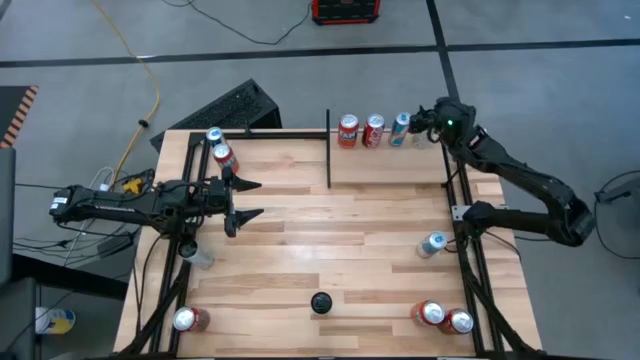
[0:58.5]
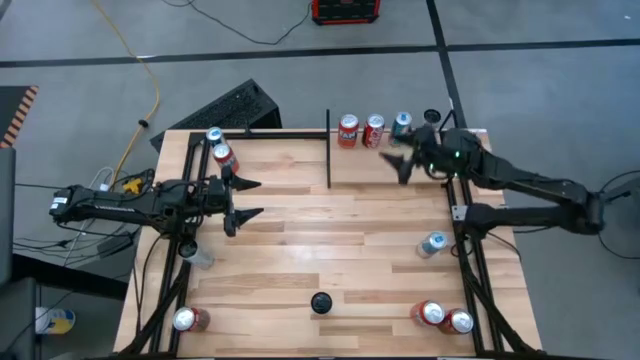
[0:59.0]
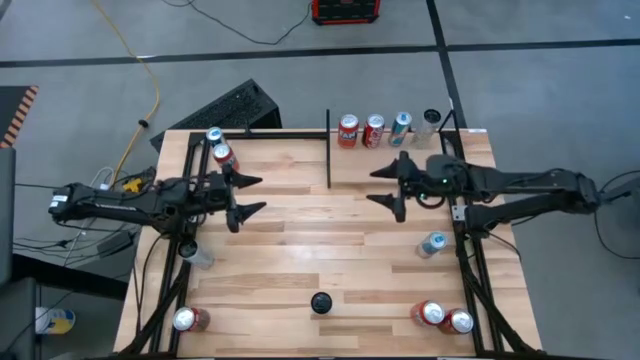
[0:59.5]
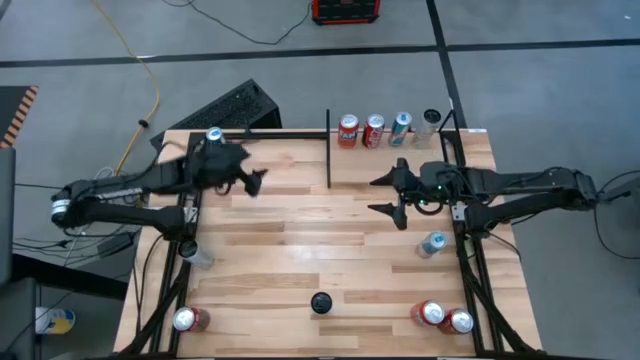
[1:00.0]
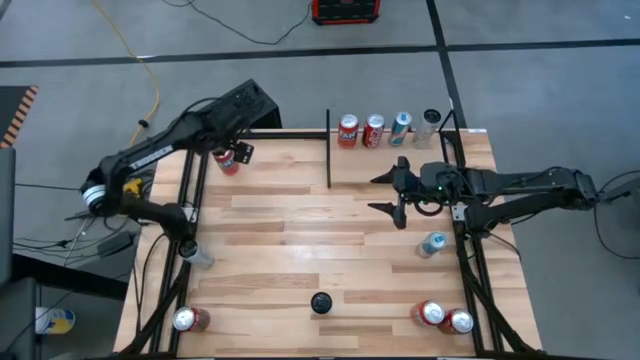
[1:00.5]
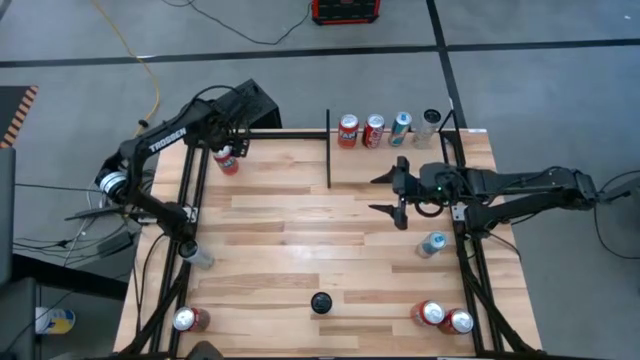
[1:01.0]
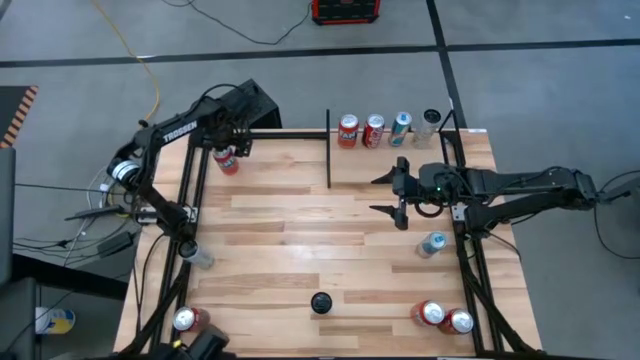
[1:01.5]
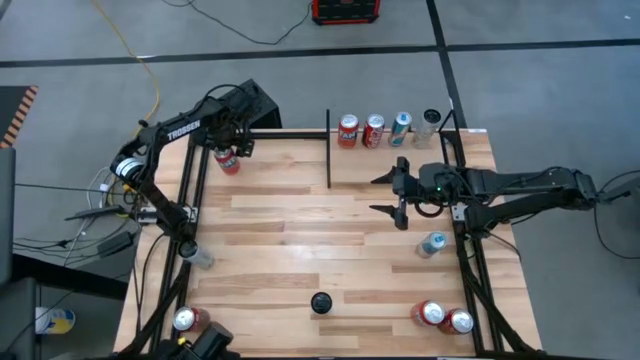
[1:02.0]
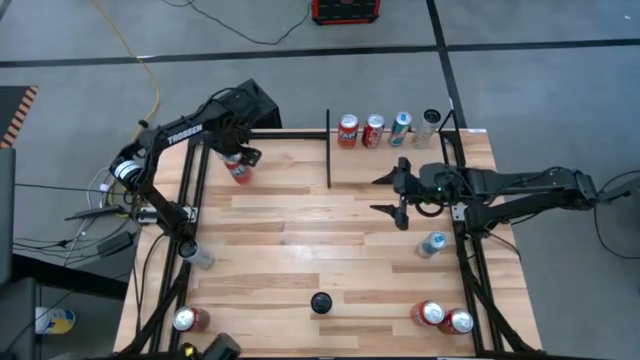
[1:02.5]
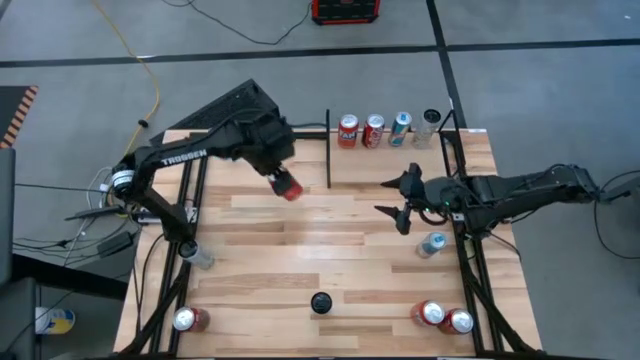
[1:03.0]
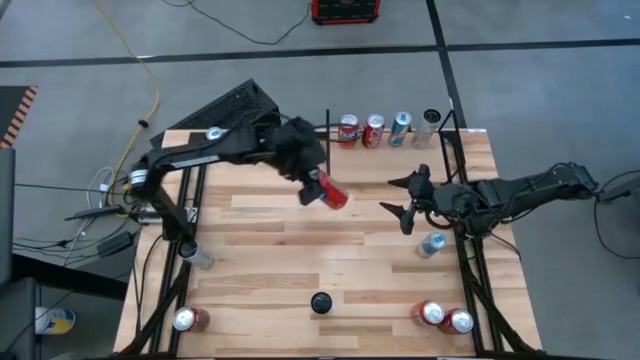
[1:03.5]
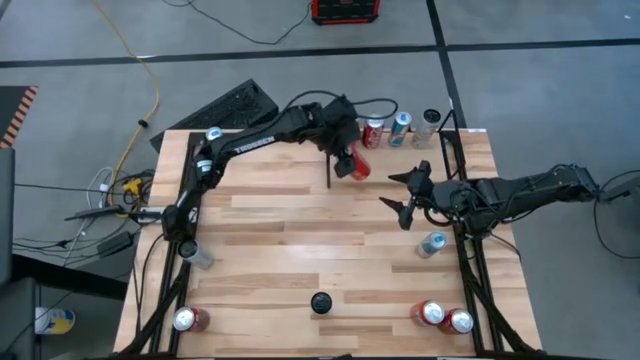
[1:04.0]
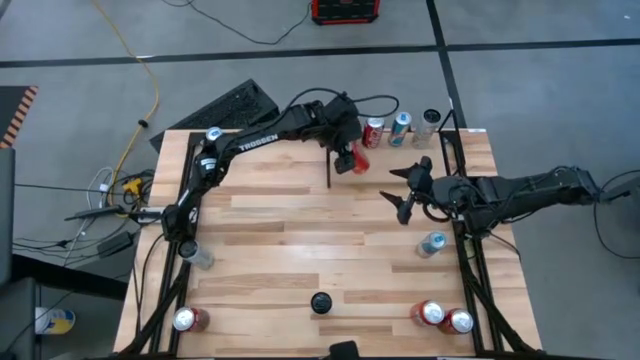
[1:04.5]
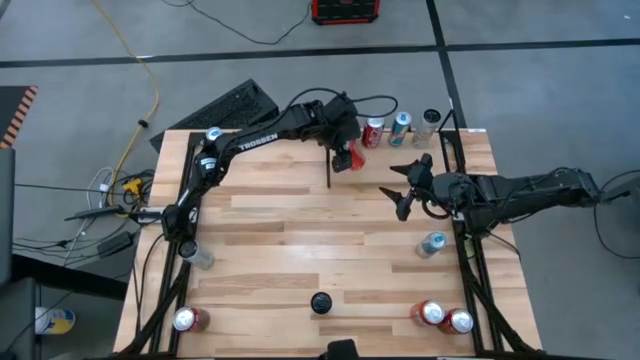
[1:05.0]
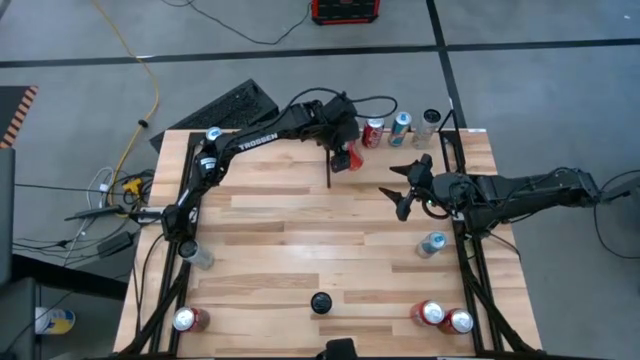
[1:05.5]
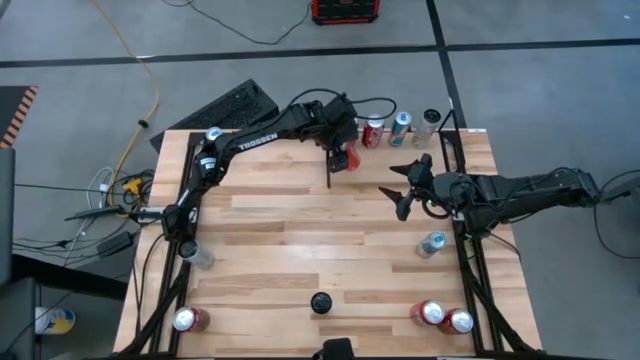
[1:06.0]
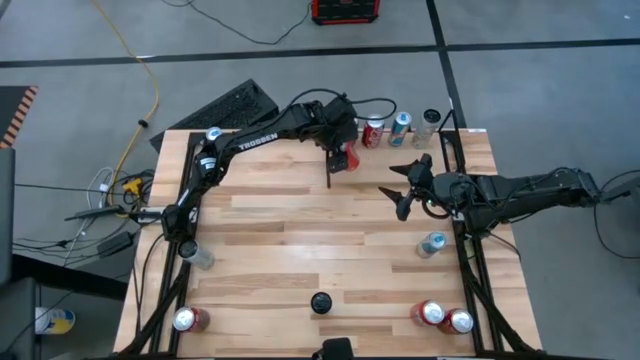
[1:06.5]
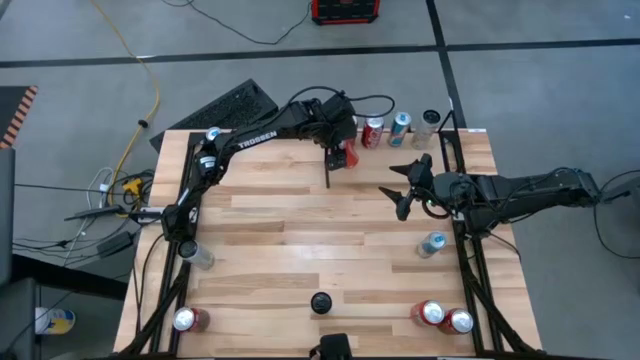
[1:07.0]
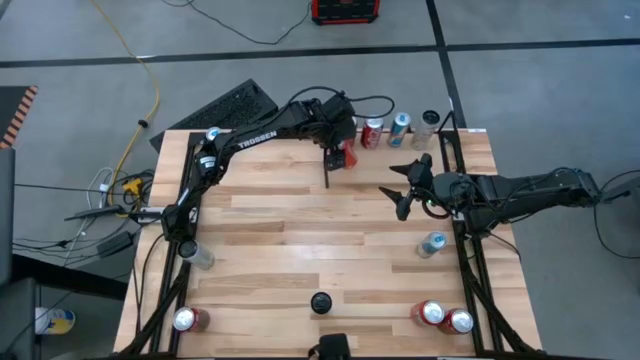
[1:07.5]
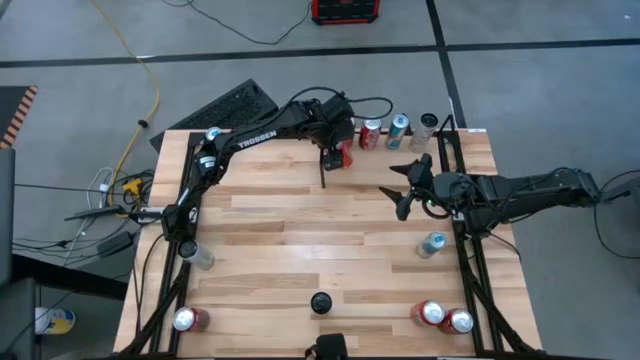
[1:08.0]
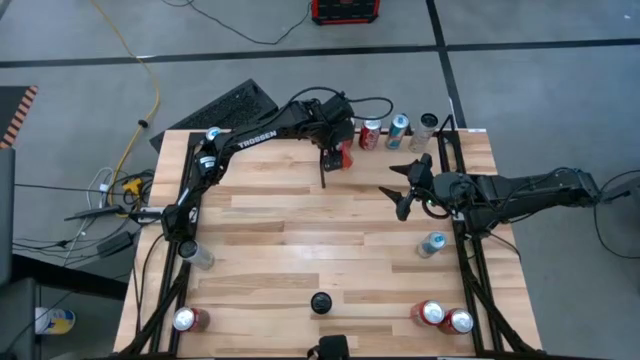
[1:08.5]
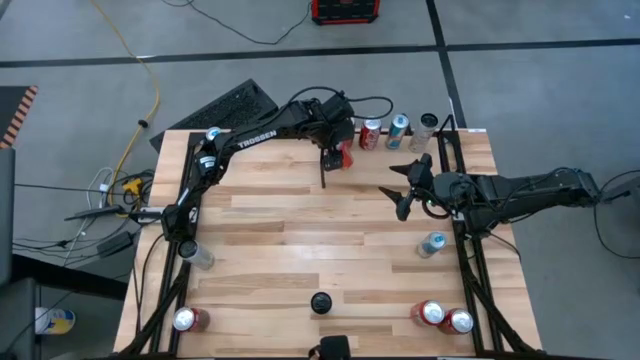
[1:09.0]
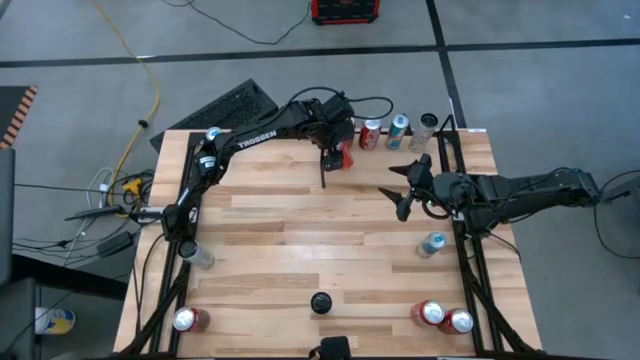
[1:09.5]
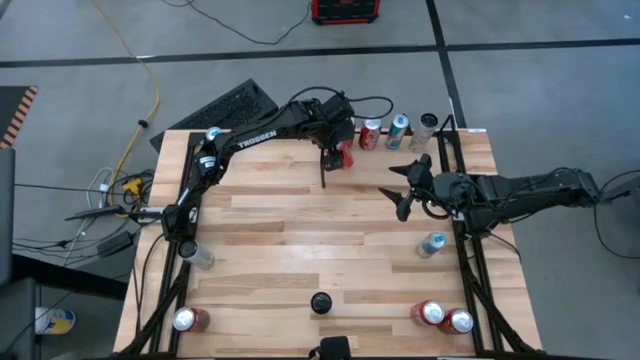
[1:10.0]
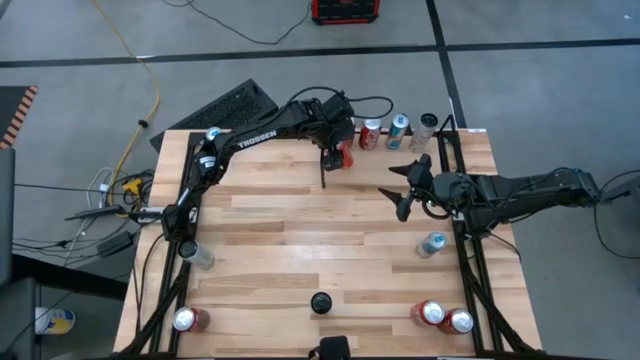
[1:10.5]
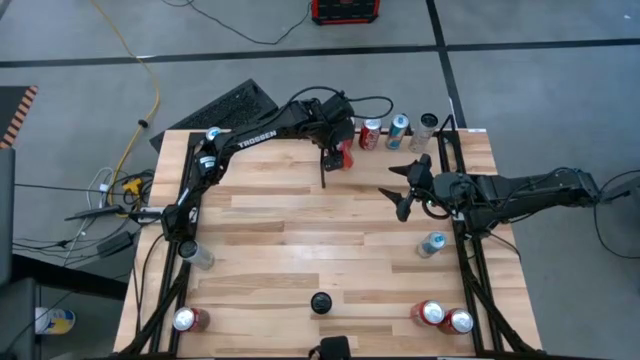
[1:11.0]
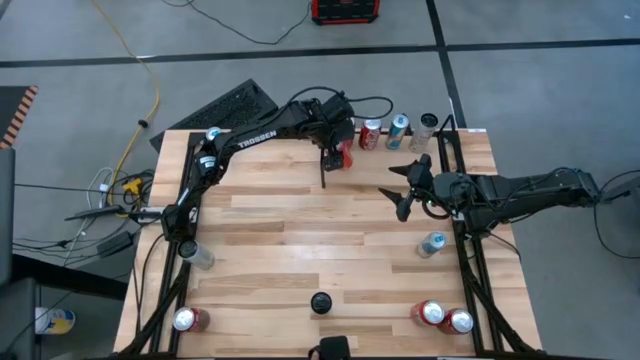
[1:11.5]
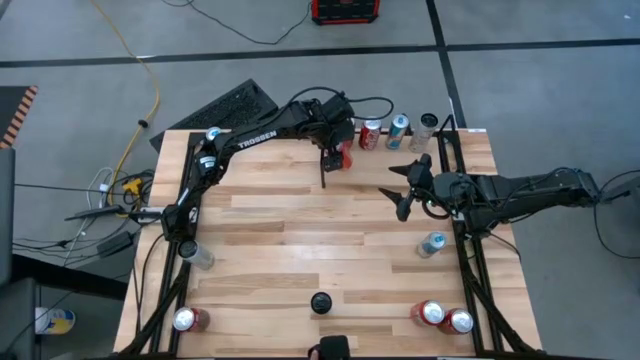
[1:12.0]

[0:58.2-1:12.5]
Task: Place canned beverage on shelf
Put the top orange soda can on the shelf aligned with the other orange soda can

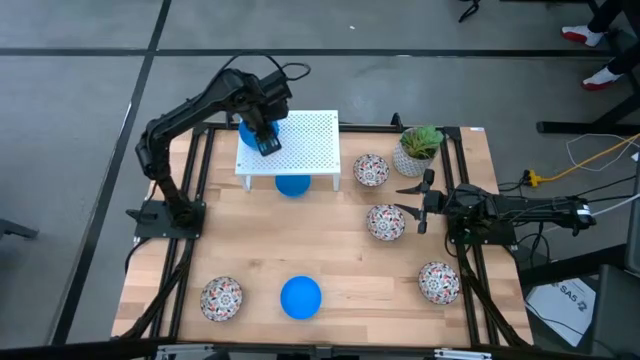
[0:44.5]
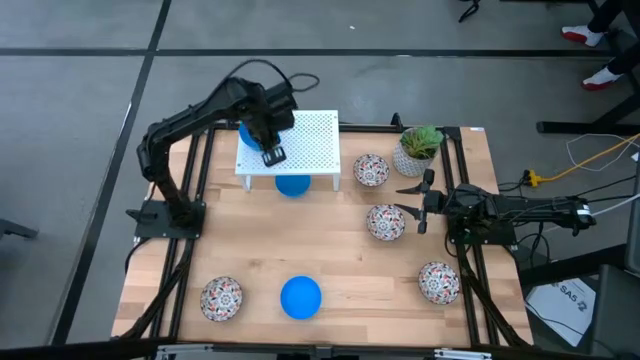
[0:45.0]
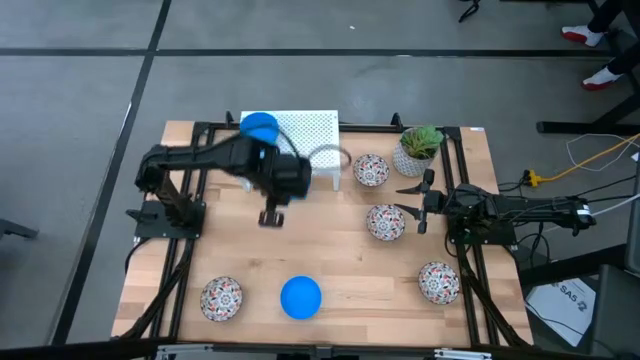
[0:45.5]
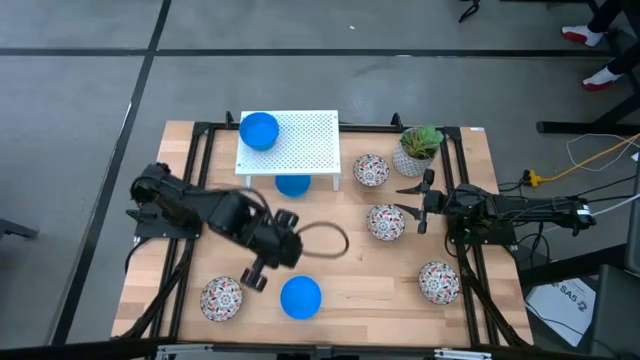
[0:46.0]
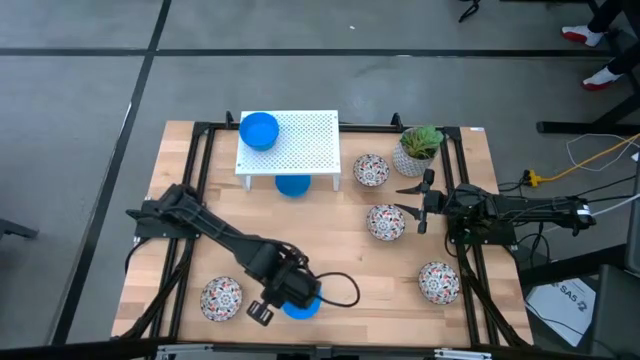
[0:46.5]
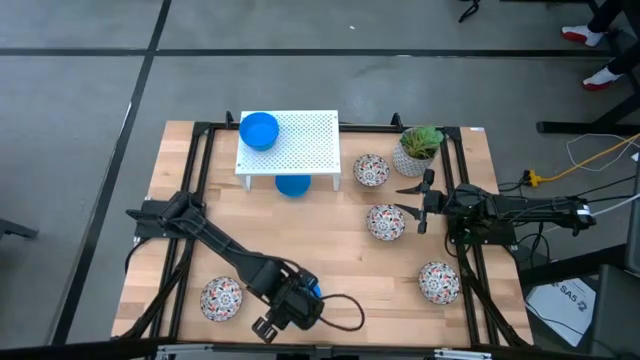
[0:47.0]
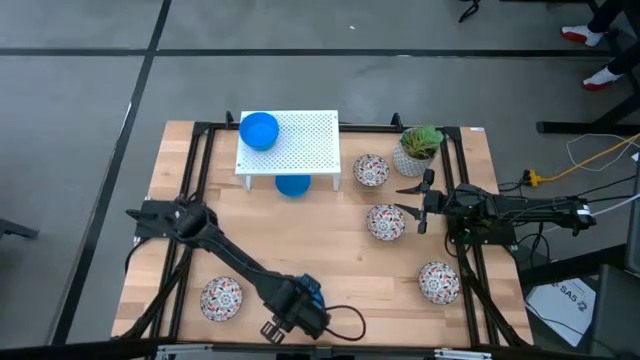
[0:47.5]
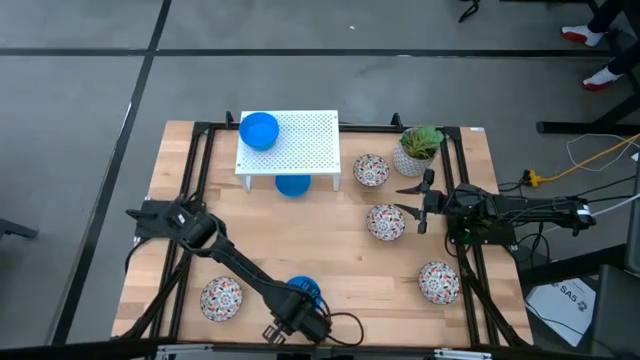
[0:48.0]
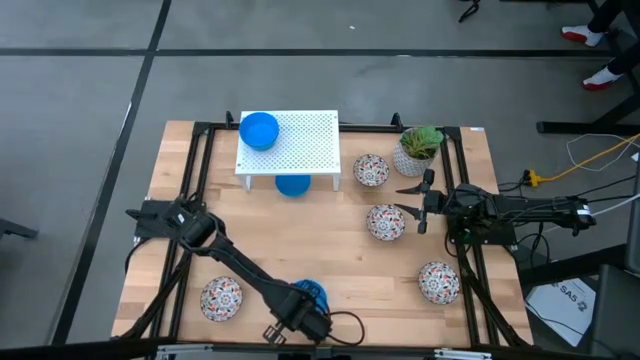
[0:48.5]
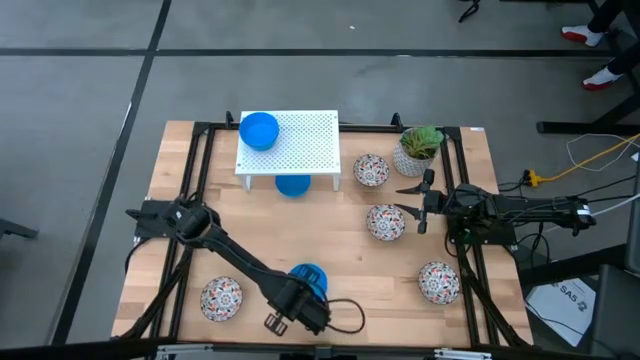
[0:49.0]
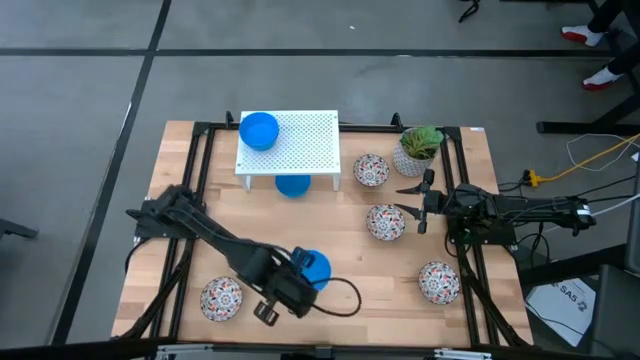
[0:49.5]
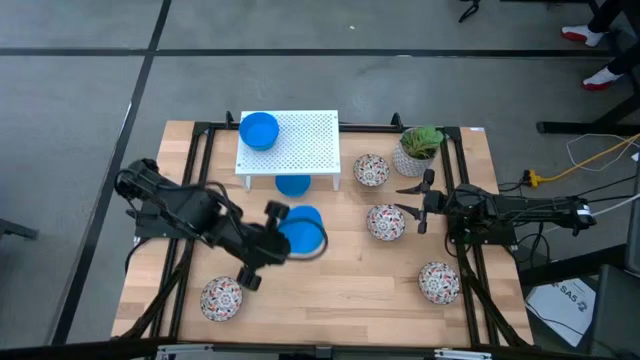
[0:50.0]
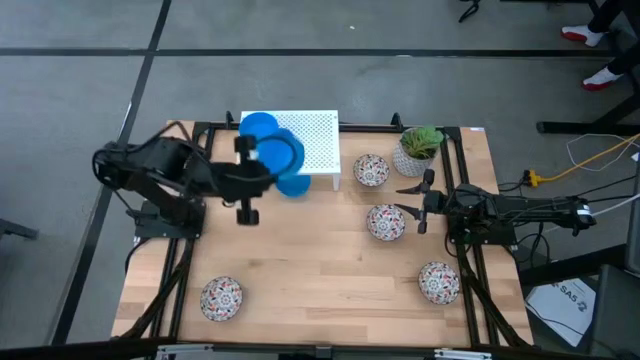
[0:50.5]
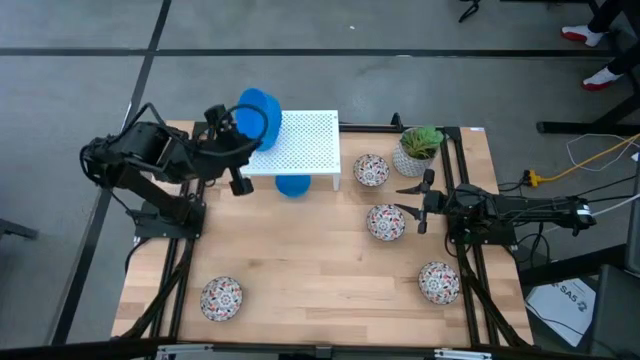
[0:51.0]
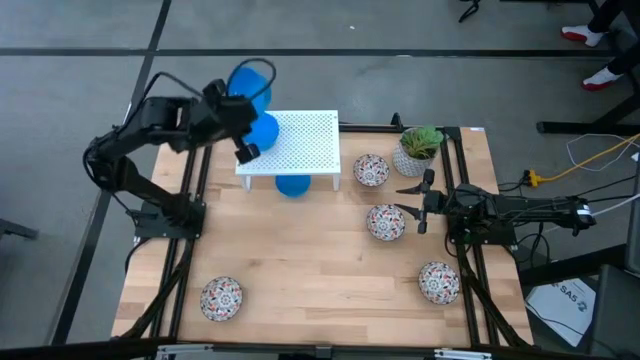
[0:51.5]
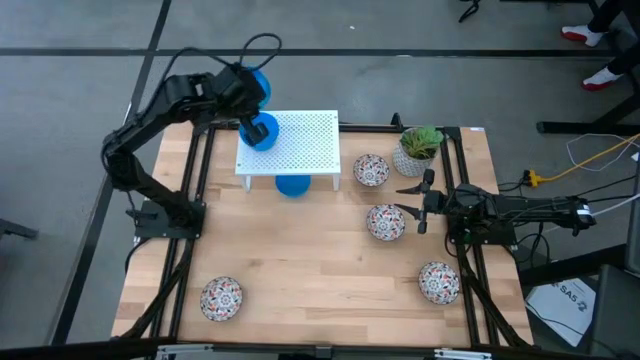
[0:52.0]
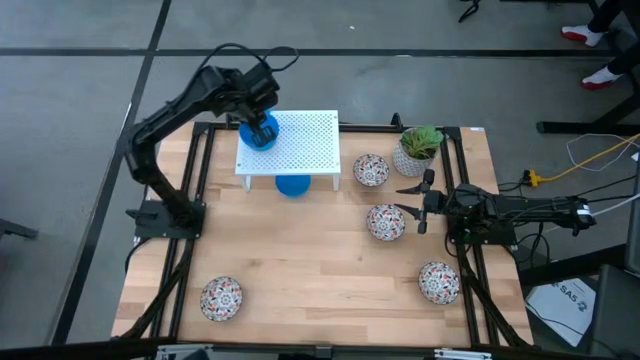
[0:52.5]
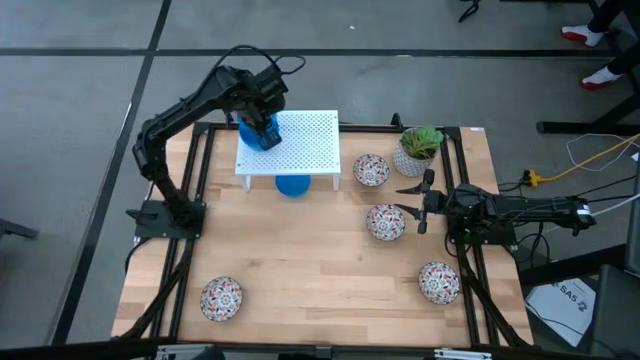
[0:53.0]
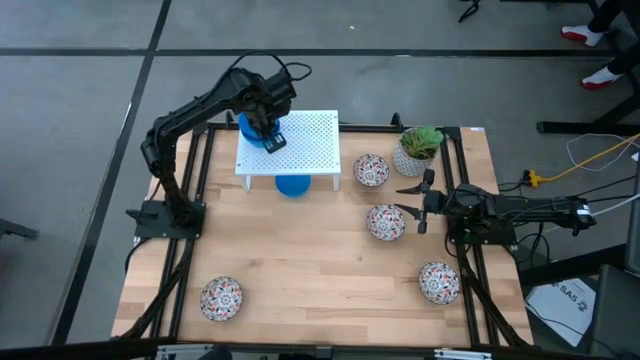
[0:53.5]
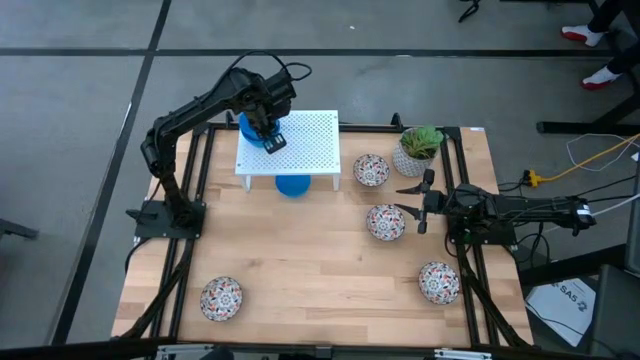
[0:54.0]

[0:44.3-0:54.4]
Task: Pick & Place Mini bowls
Stack the blue bowl on the blue bowls on the shelf
